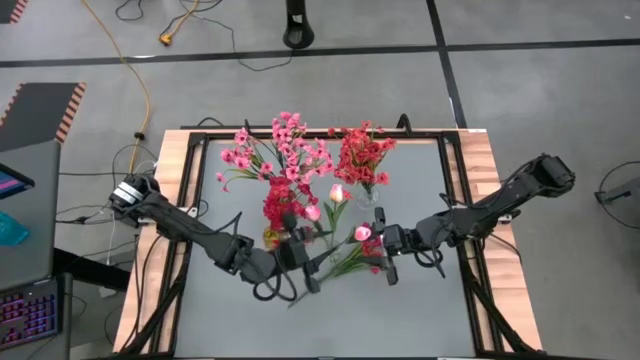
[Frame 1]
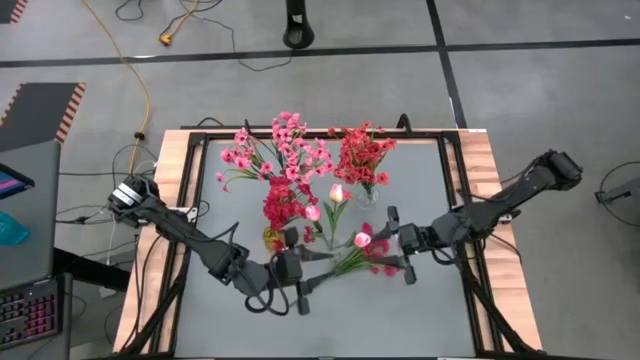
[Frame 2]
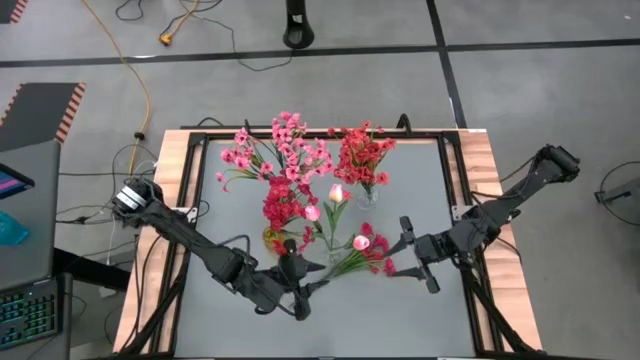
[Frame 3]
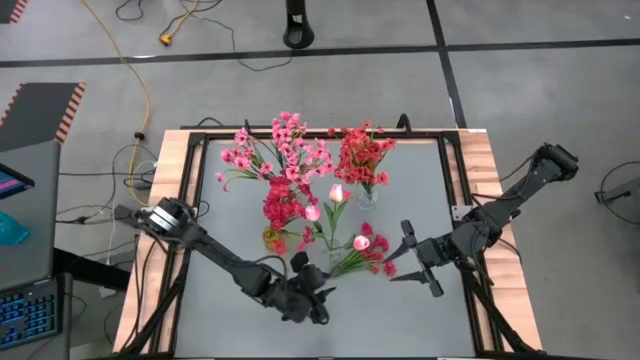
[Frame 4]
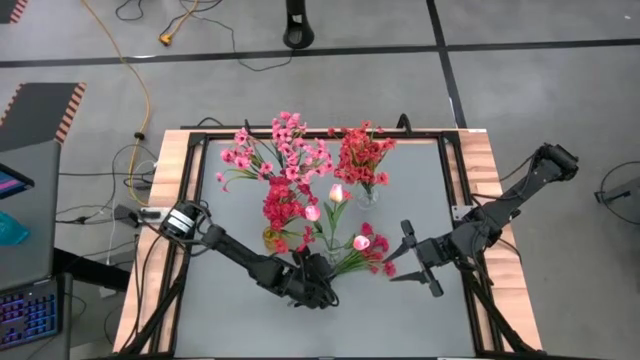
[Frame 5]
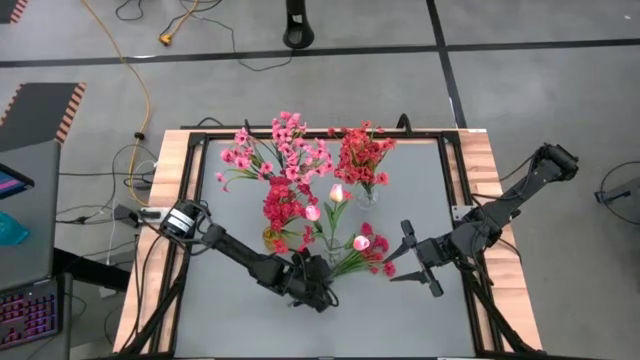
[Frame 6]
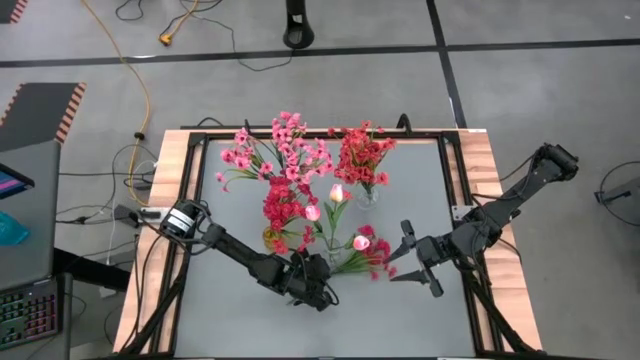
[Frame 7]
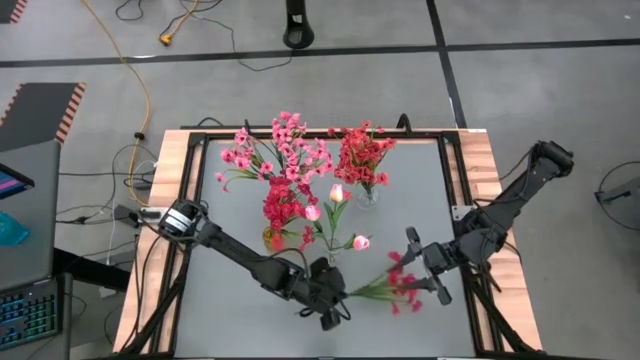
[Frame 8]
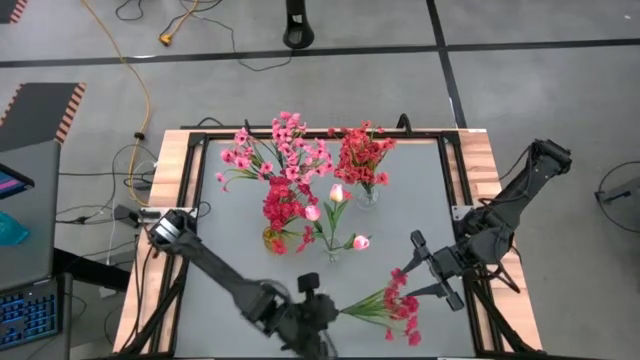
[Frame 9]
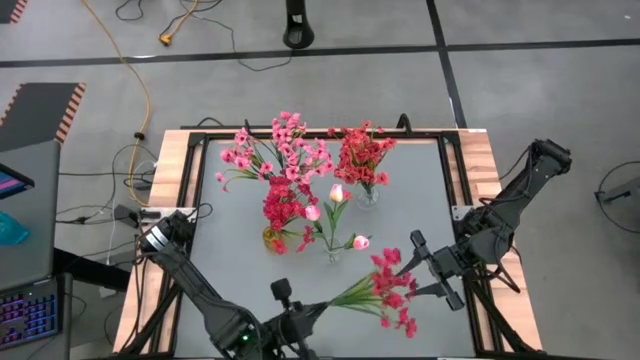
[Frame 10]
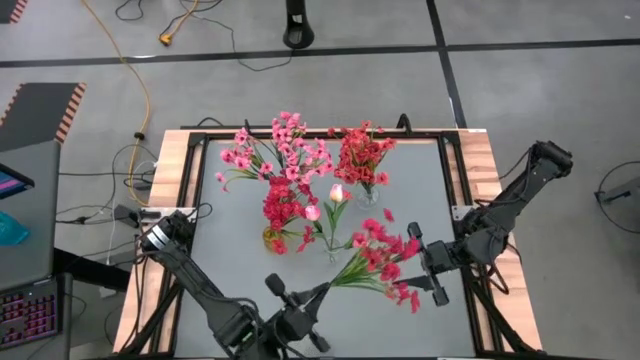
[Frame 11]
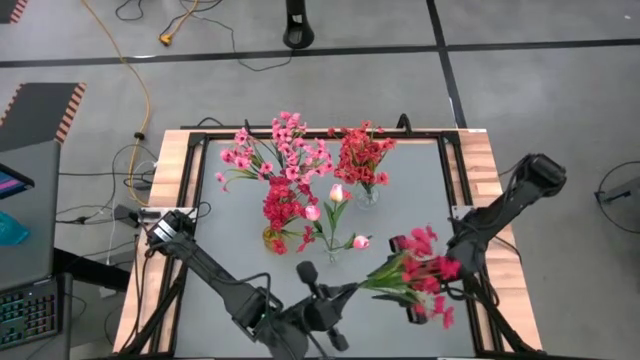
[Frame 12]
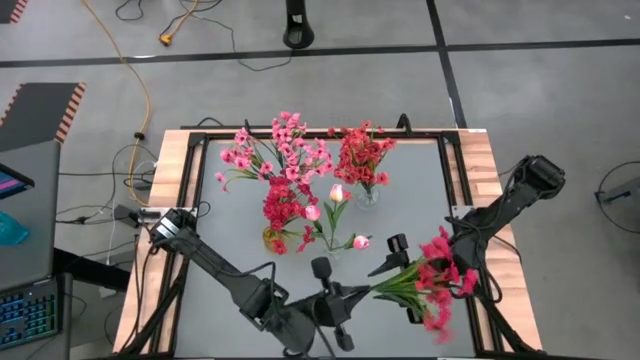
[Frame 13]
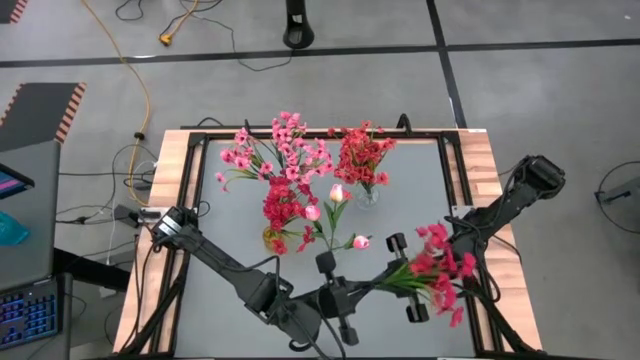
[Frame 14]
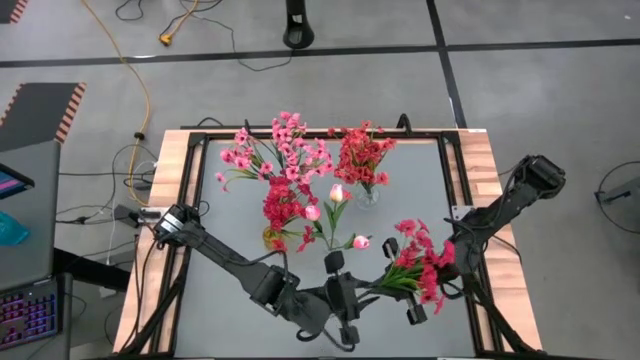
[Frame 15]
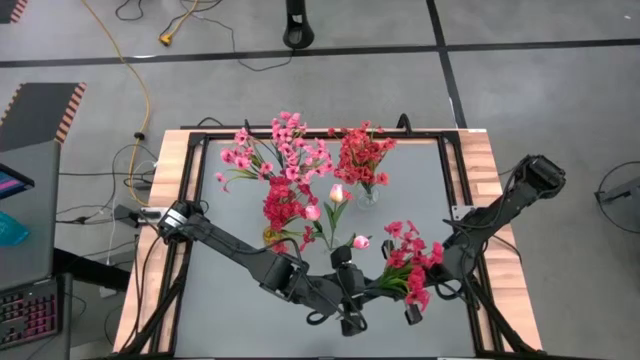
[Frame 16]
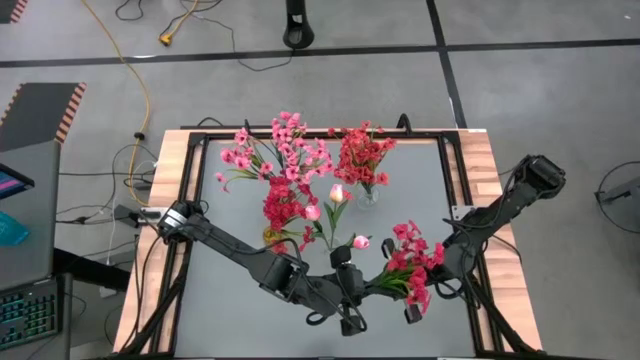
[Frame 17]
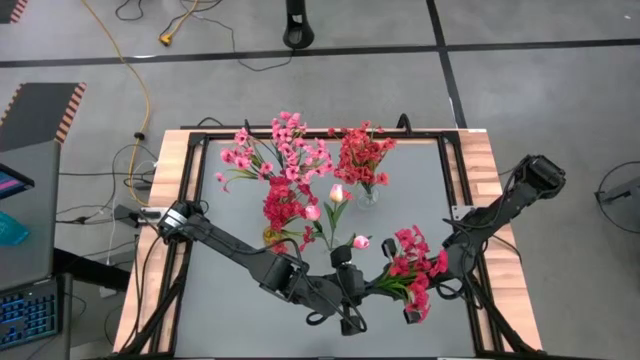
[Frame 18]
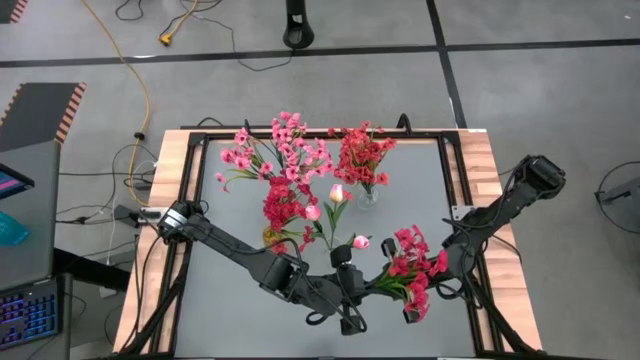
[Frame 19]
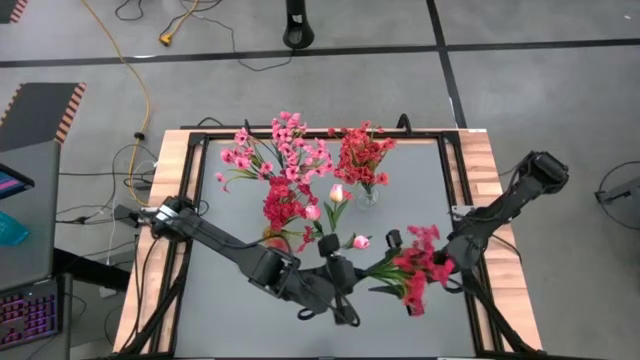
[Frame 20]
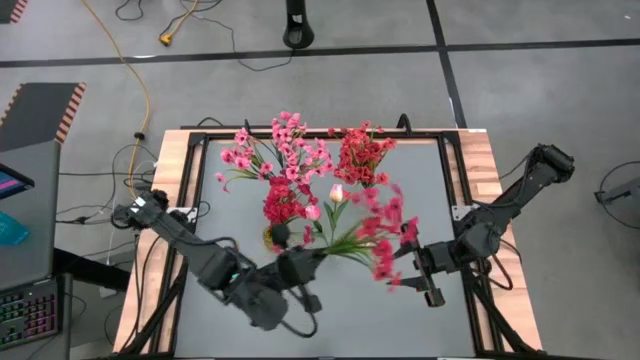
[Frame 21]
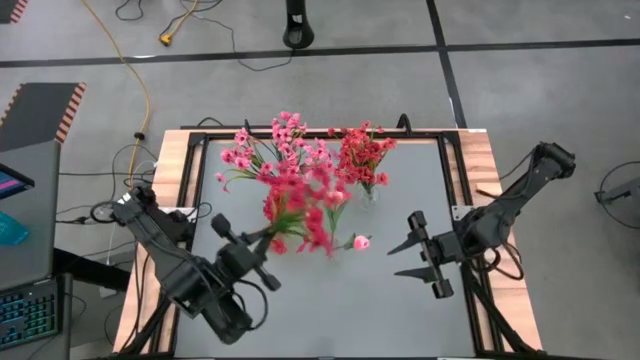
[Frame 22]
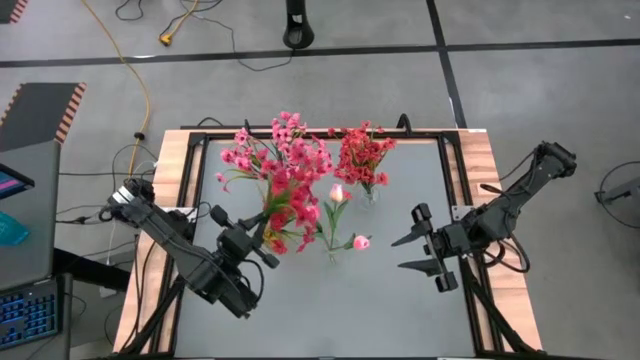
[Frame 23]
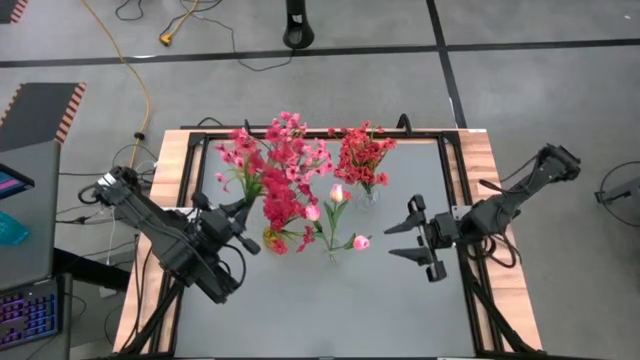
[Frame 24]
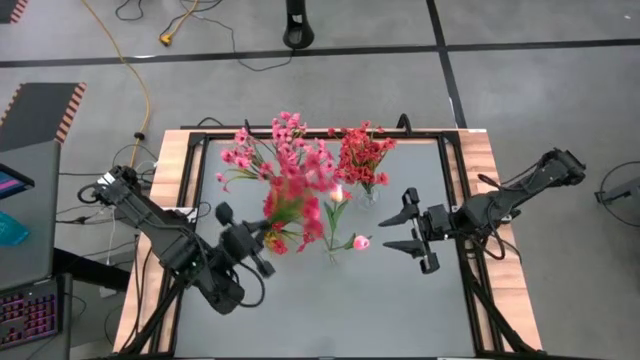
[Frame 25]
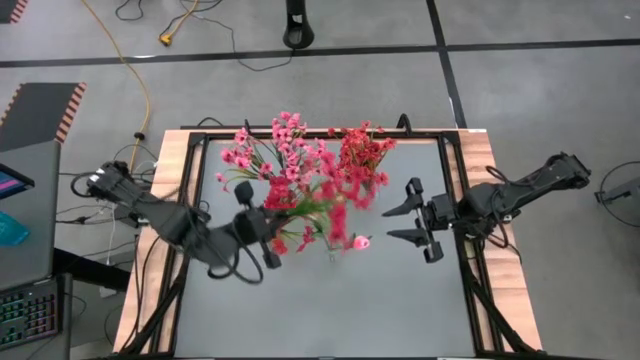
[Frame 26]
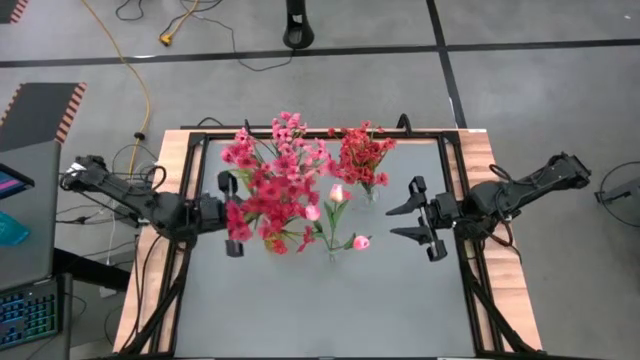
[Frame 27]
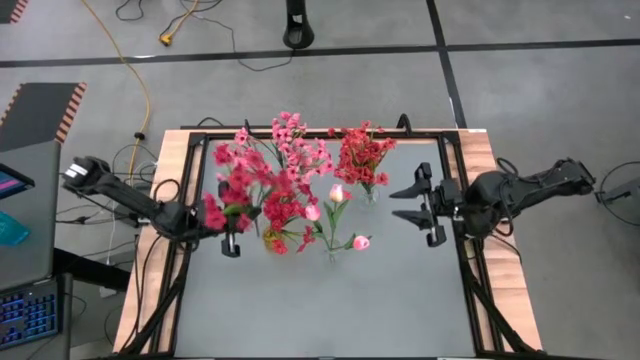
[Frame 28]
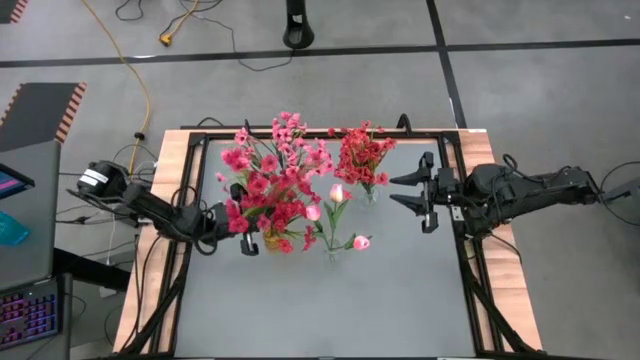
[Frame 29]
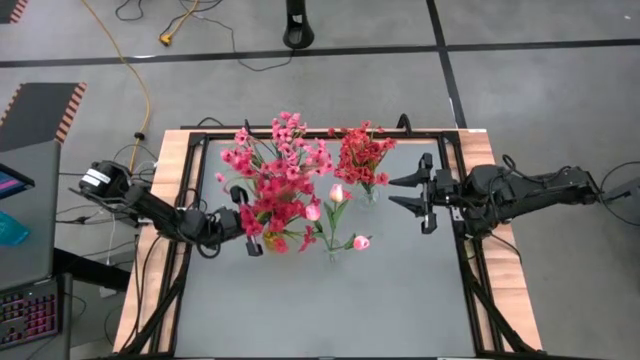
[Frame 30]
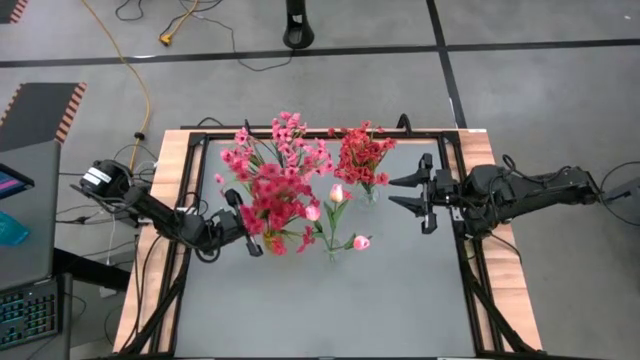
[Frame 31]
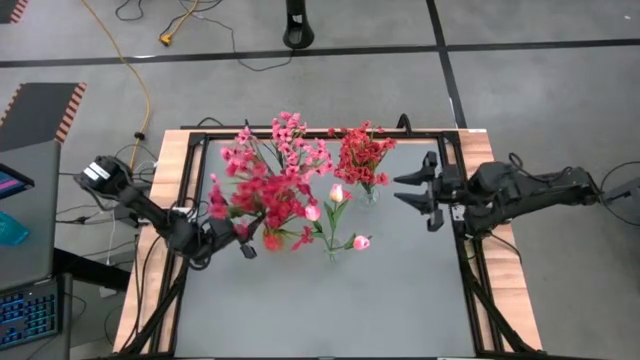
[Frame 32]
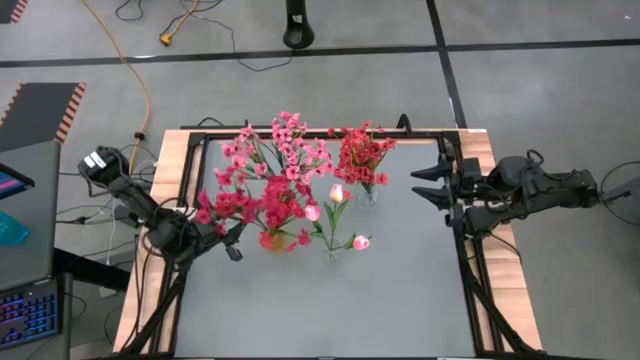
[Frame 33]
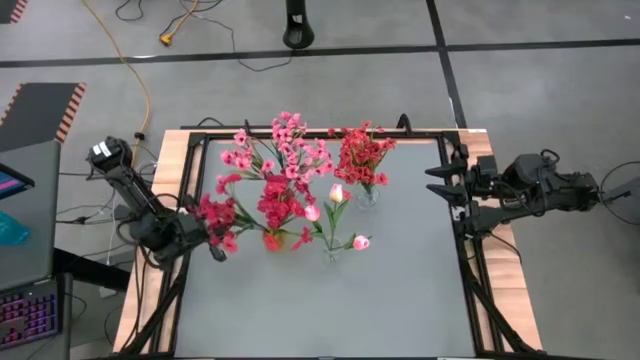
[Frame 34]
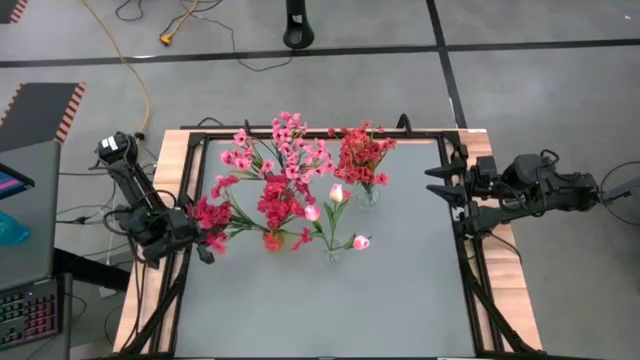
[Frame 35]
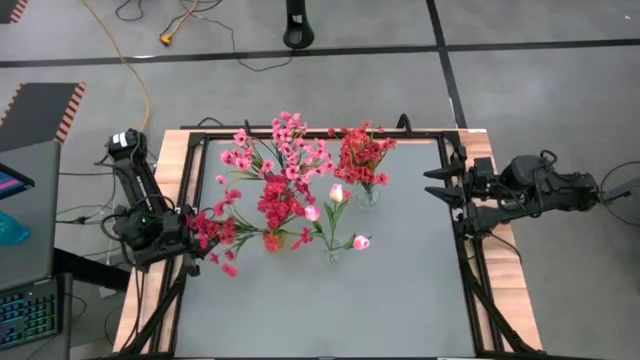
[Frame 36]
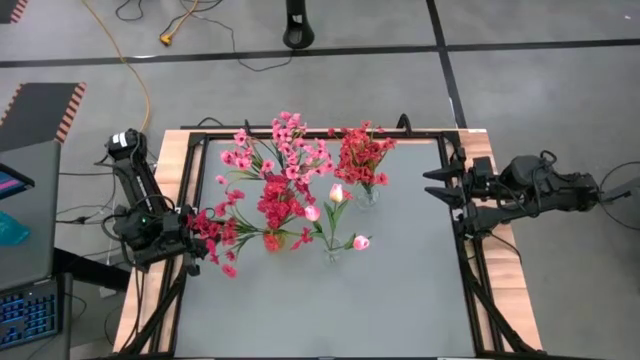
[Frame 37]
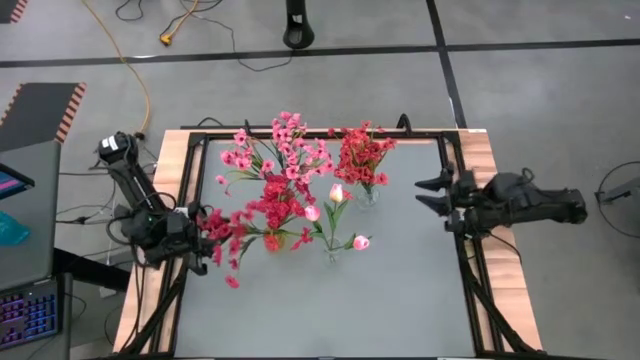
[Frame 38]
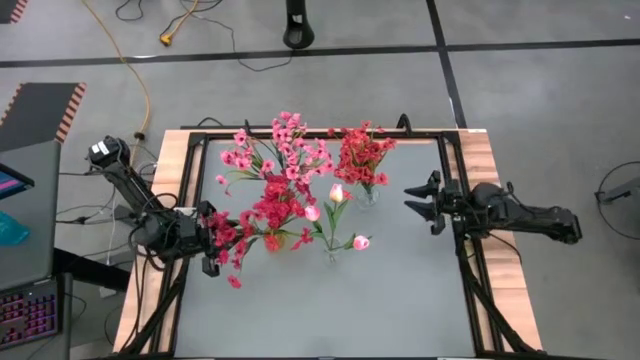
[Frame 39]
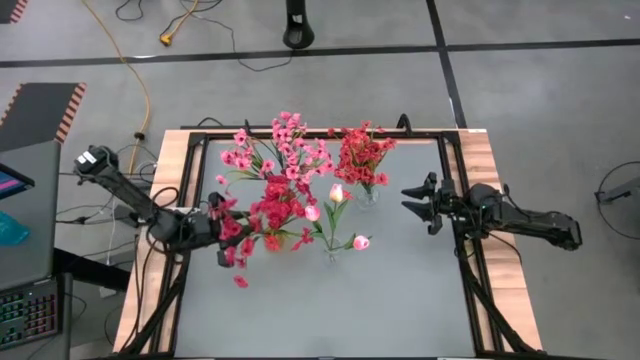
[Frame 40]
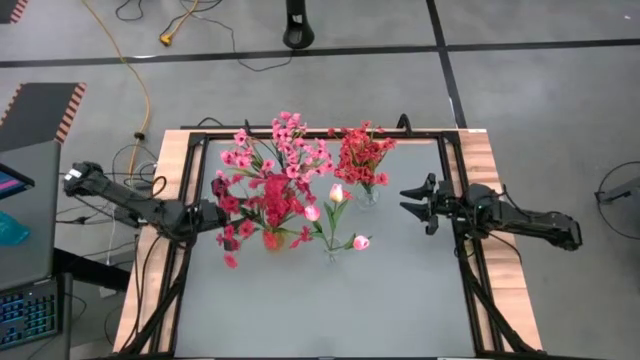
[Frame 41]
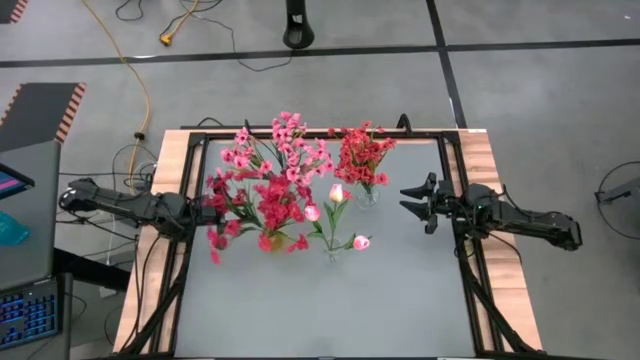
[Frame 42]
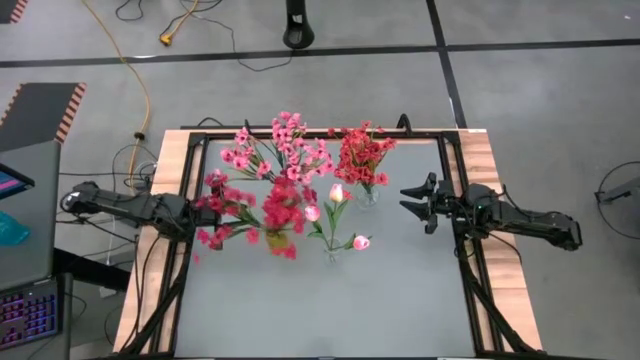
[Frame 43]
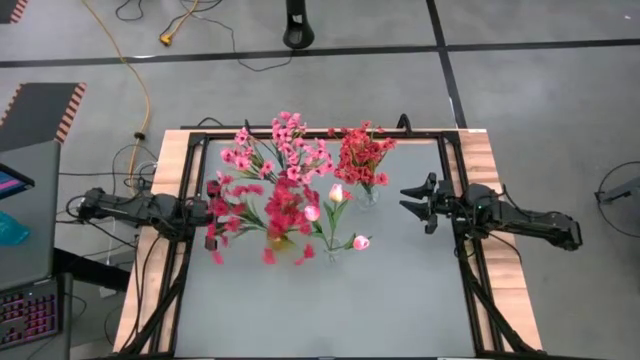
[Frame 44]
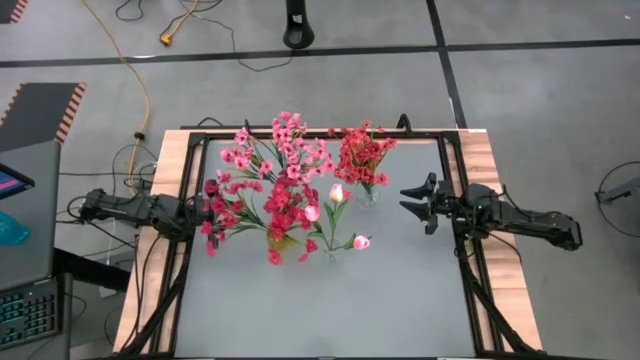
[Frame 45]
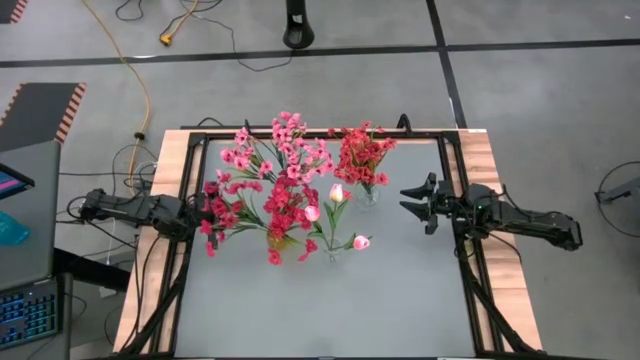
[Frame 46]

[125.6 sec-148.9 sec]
Task: Sort flowers into vase by color
Put the red flowers into the yellow vase
